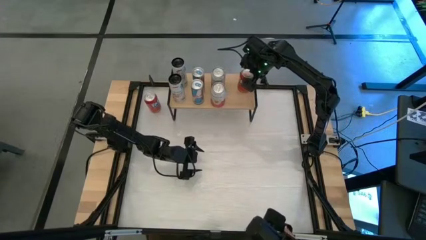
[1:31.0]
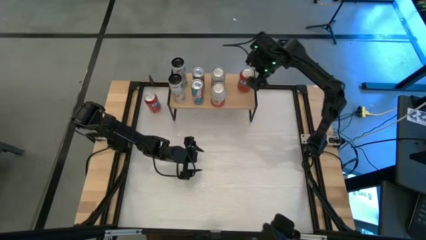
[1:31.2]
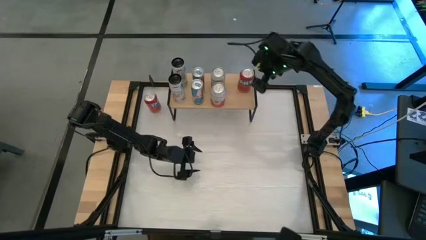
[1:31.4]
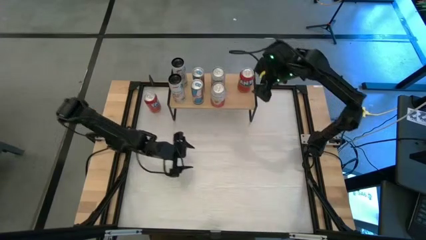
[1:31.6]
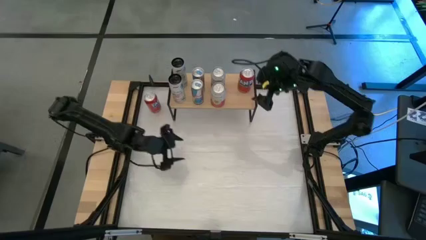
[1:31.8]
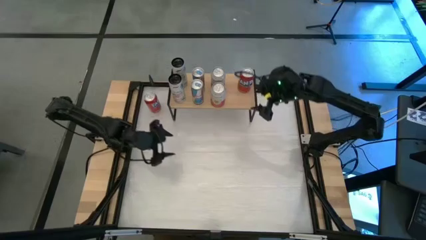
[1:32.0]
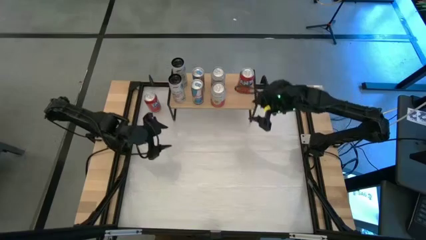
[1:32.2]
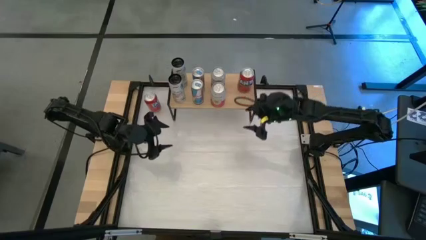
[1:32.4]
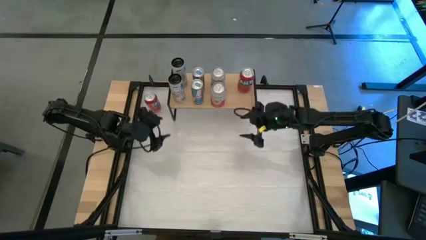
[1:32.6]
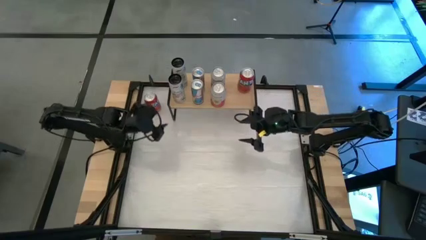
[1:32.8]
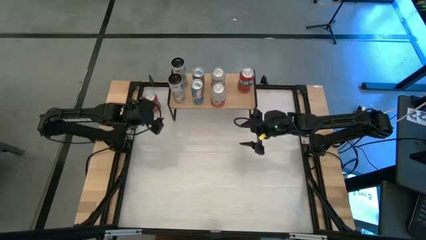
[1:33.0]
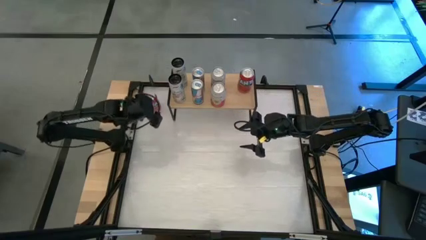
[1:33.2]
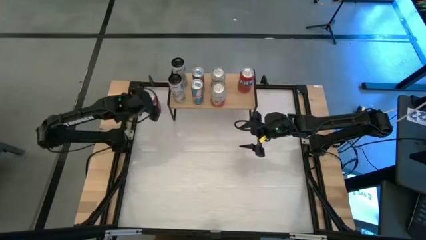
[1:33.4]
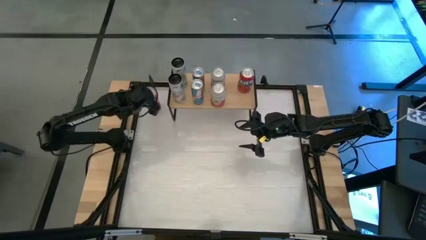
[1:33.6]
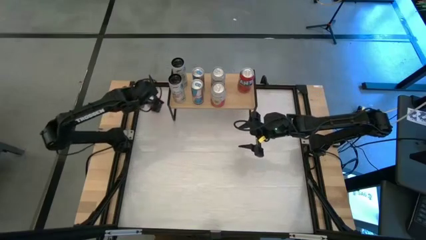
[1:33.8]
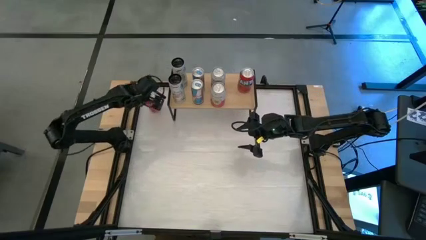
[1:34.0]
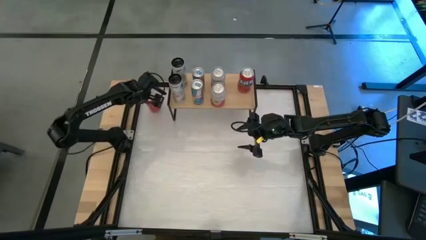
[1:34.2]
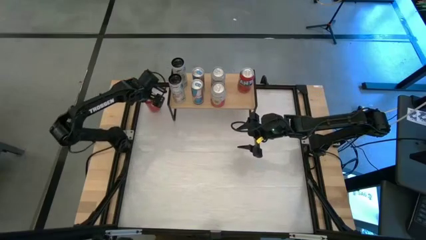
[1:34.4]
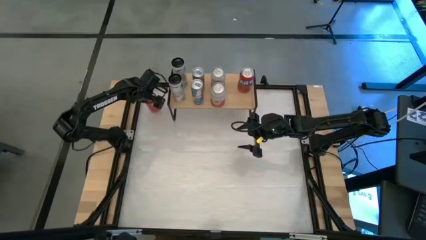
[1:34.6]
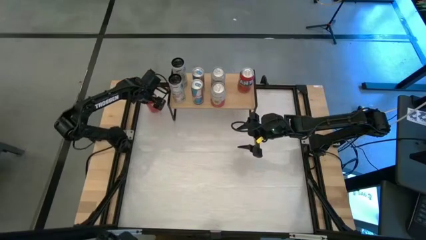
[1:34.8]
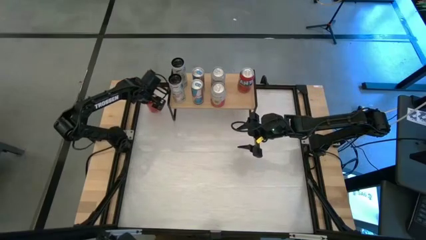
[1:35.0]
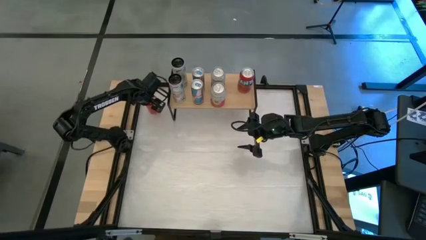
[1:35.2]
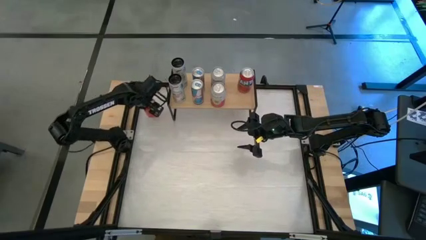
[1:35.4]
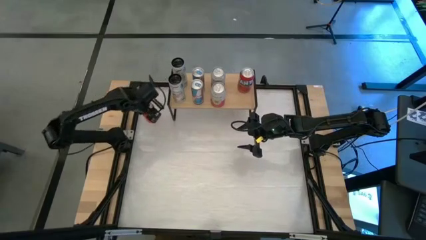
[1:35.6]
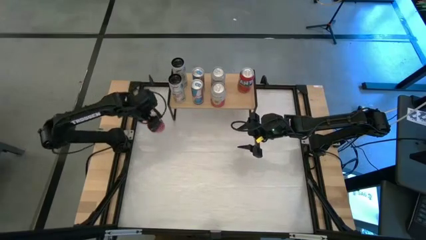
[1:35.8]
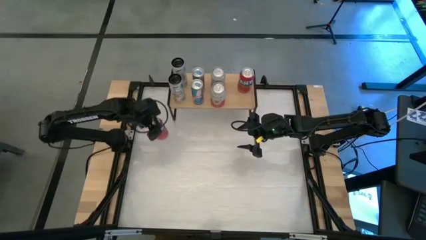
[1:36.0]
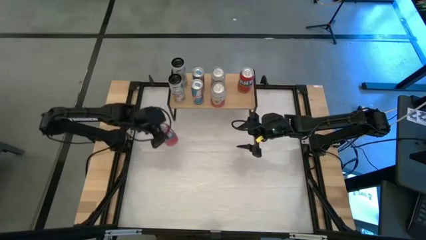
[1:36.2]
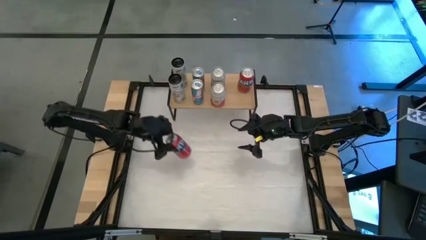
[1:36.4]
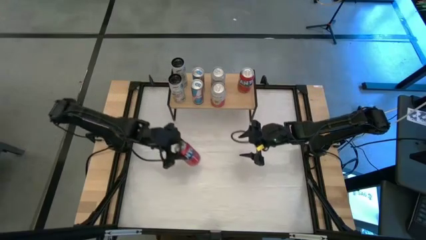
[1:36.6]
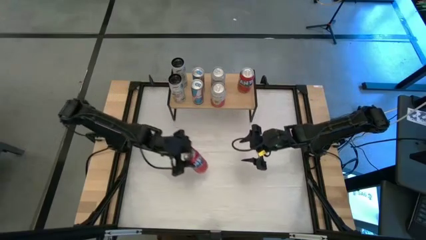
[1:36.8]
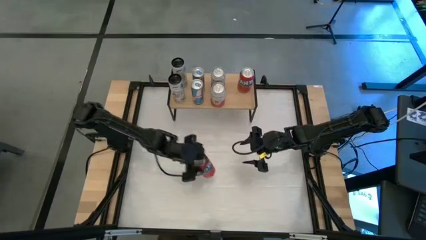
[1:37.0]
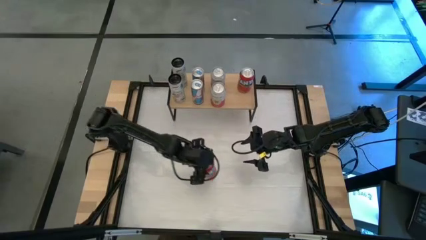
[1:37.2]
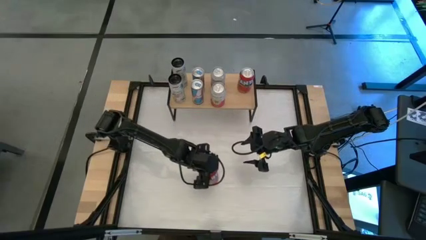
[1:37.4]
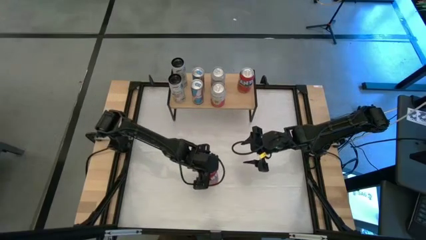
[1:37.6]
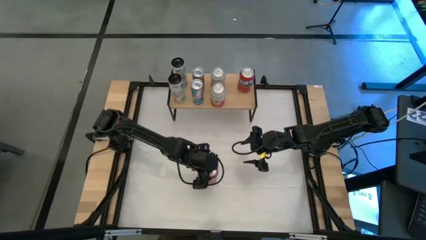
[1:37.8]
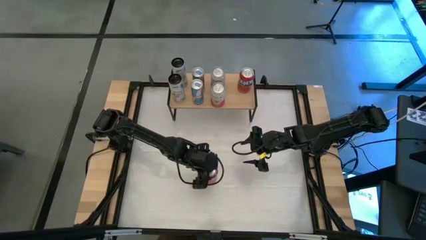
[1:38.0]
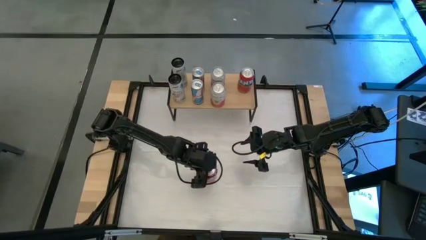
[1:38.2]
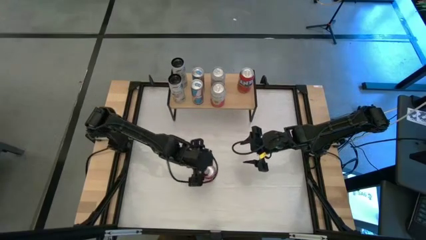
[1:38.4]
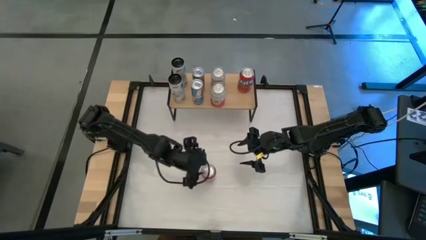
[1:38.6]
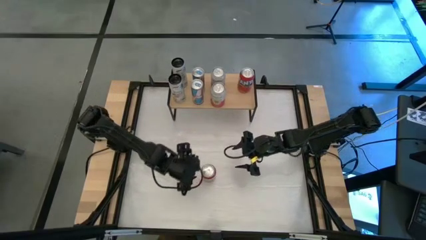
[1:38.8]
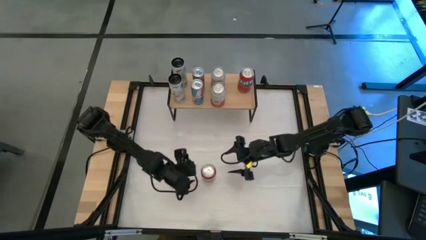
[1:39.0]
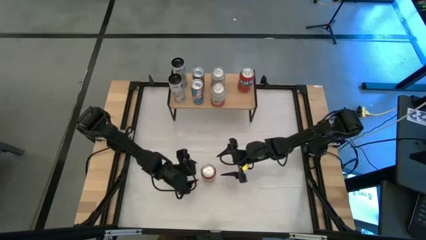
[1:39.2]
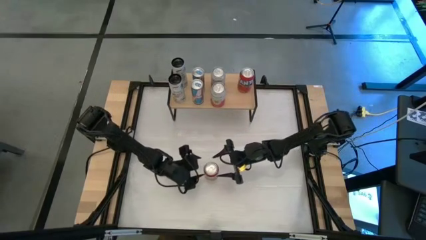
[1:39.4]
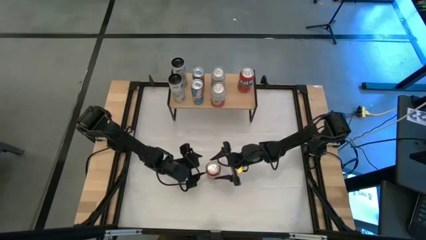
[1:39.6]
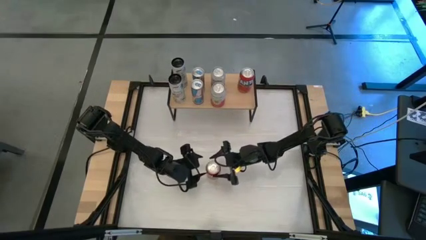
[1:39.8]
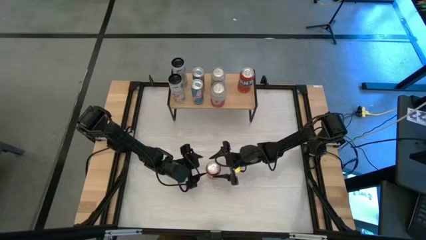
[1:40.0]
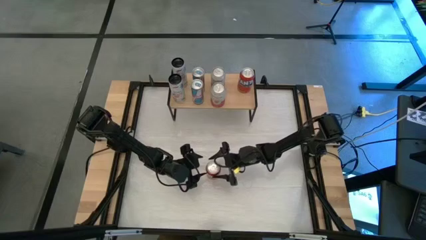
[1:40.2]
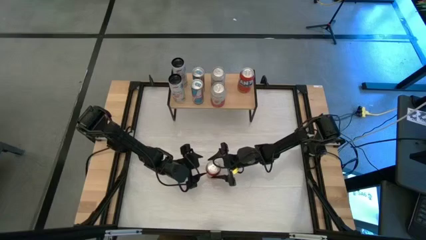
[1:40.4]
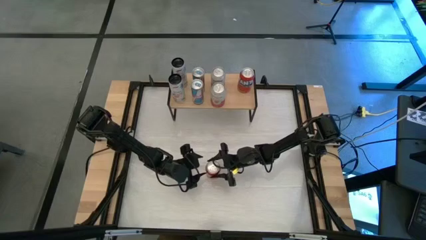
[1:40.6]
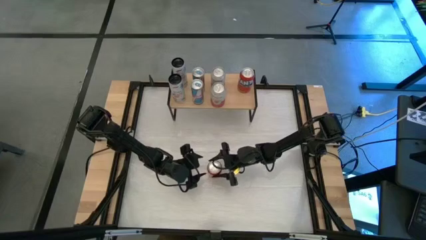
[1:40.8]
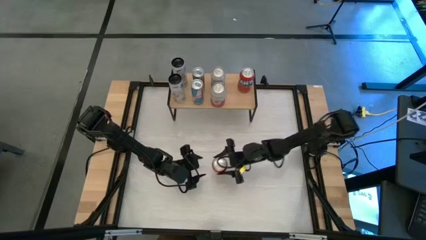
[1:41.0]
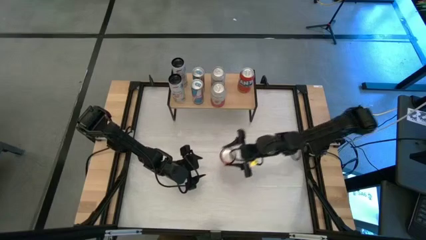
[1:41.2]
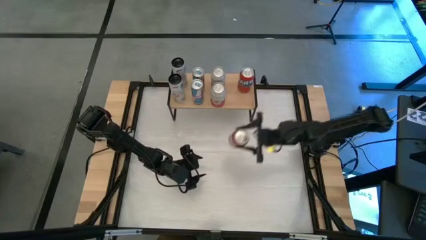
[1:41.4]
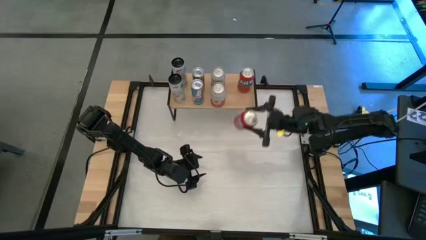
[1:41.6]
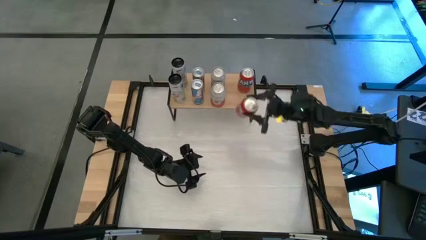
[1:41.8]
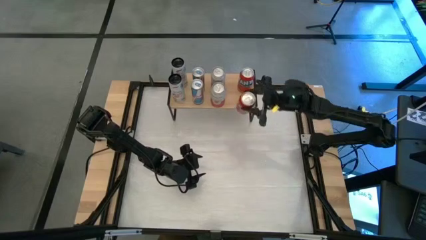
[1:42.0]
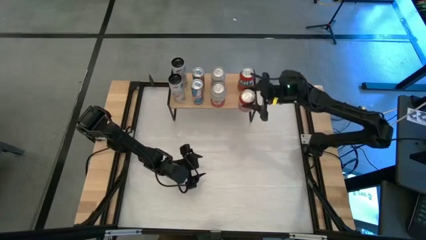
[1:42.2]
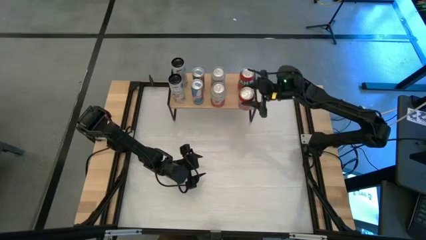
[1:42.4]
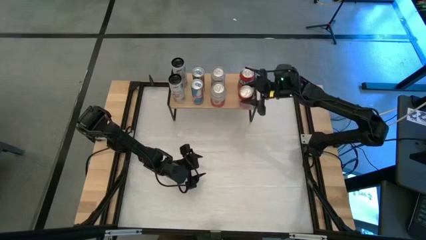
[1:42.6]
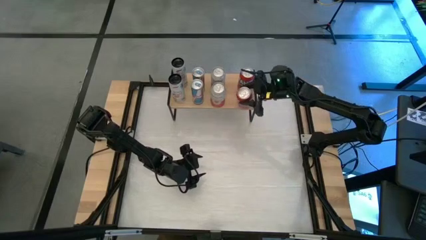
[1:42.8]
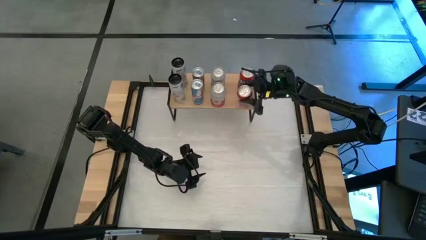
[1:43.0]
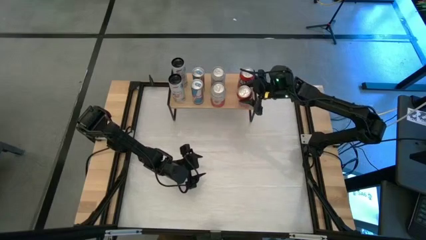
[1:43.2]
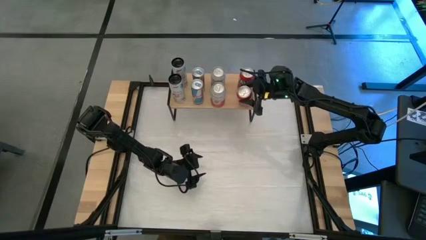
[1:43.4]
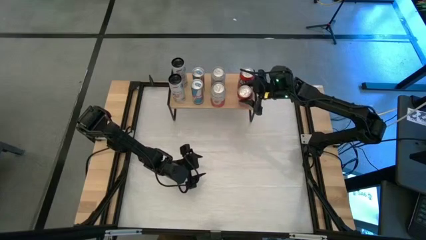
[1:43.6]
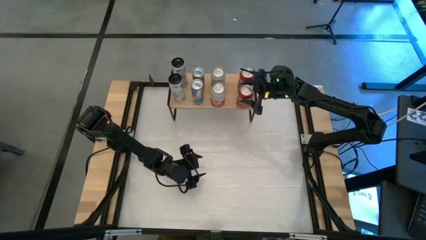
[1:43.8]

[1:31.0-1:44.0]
Task: Place canned beverage on shelf
Put the red soda can on the shelf
